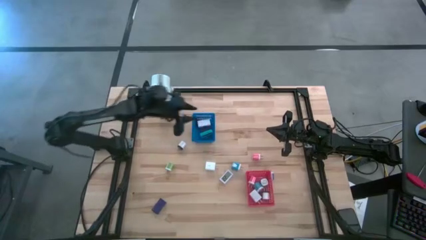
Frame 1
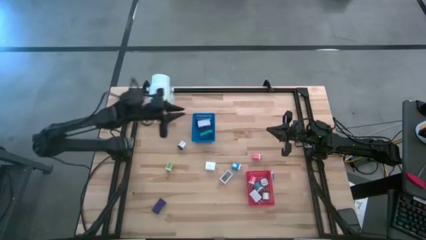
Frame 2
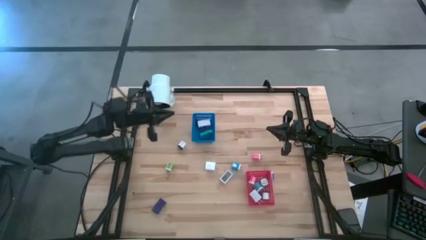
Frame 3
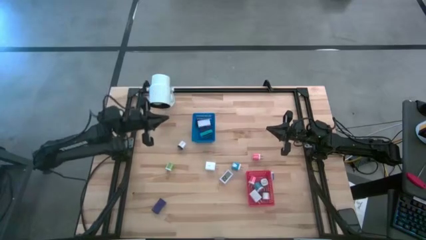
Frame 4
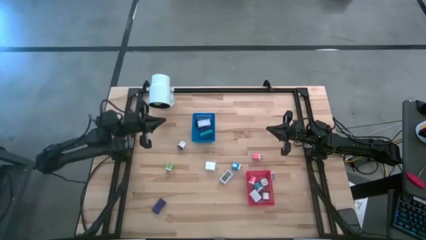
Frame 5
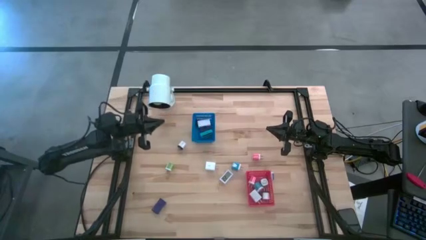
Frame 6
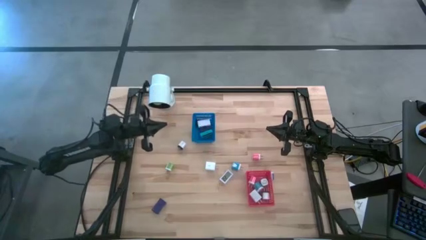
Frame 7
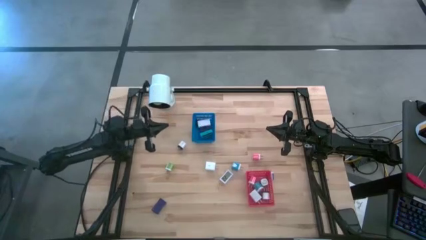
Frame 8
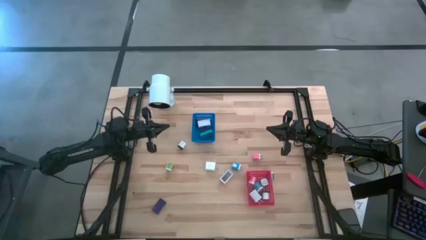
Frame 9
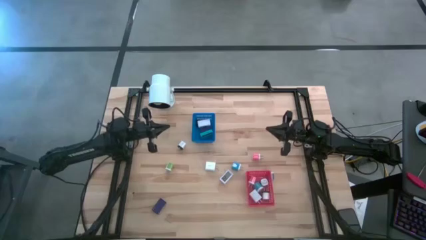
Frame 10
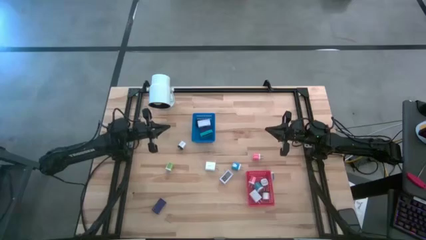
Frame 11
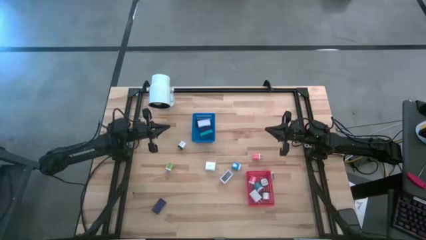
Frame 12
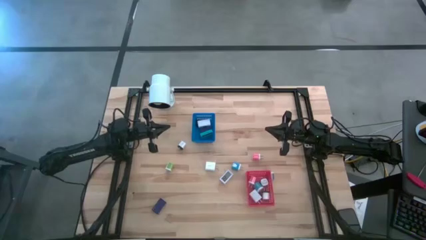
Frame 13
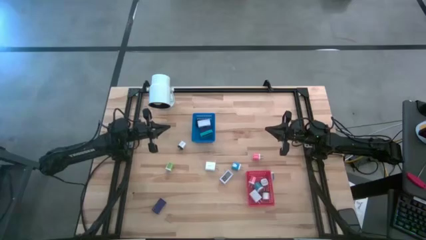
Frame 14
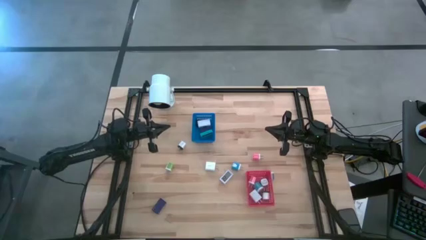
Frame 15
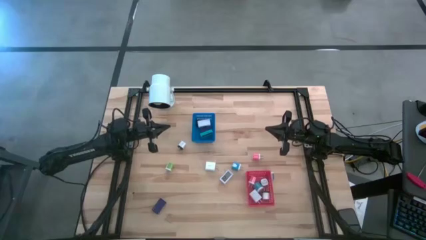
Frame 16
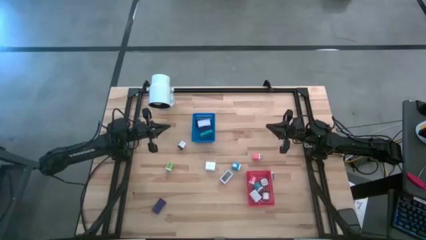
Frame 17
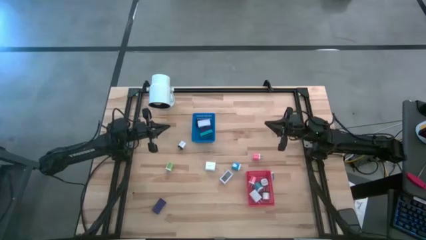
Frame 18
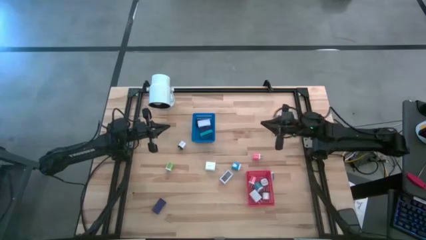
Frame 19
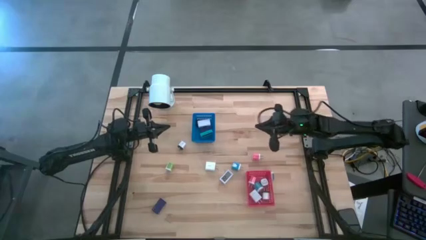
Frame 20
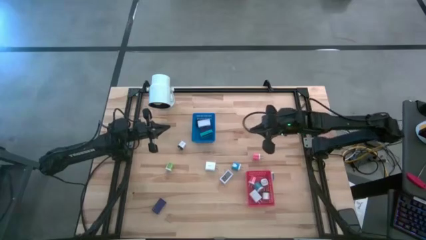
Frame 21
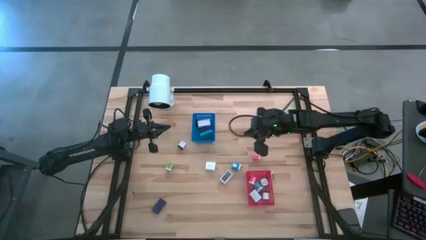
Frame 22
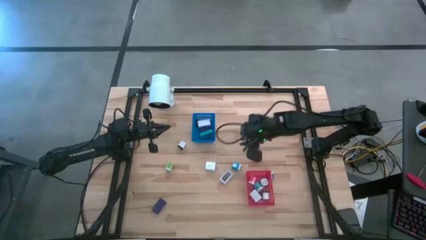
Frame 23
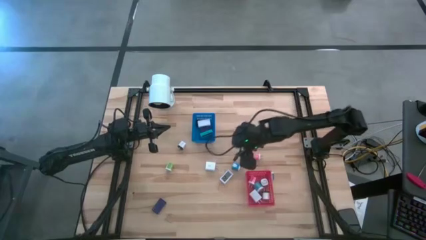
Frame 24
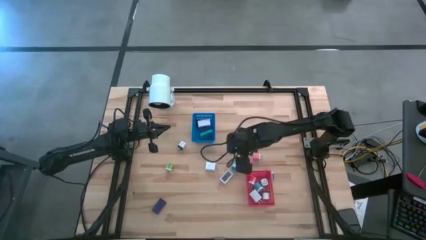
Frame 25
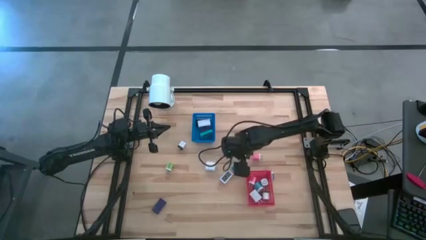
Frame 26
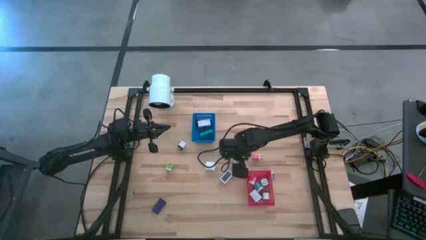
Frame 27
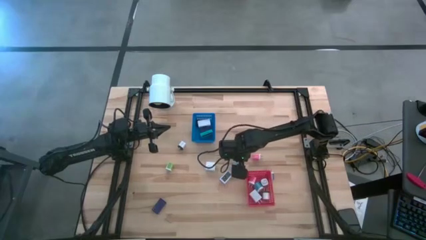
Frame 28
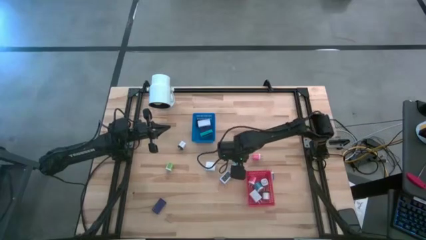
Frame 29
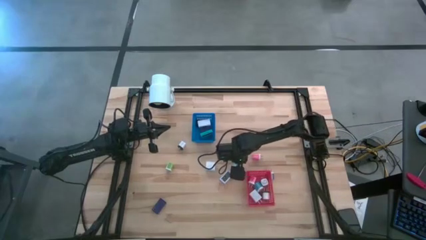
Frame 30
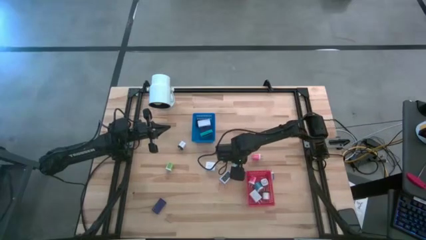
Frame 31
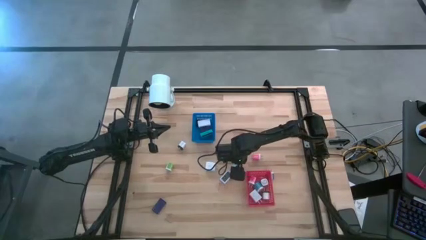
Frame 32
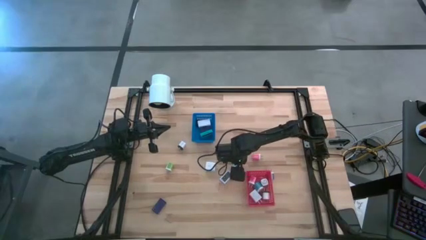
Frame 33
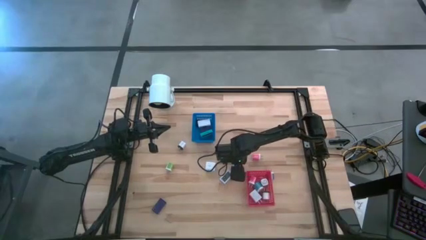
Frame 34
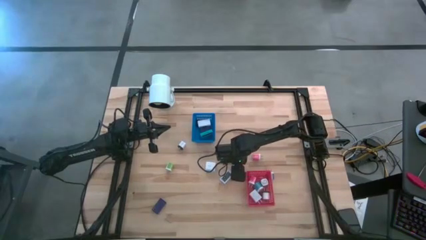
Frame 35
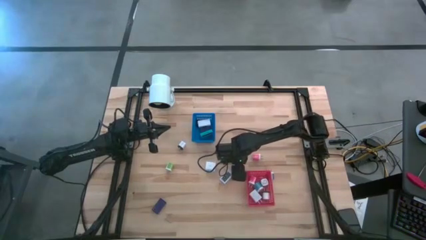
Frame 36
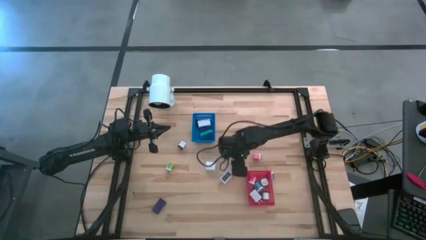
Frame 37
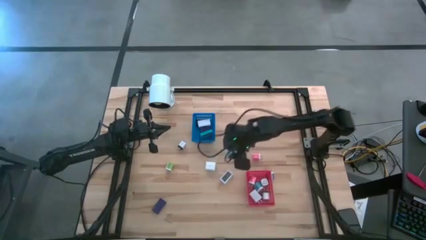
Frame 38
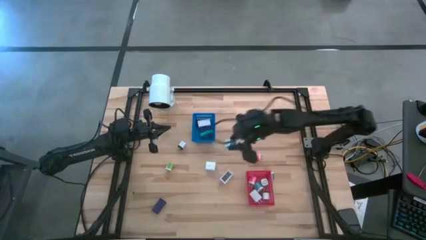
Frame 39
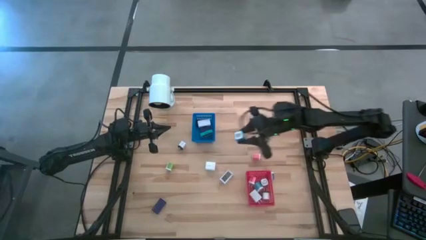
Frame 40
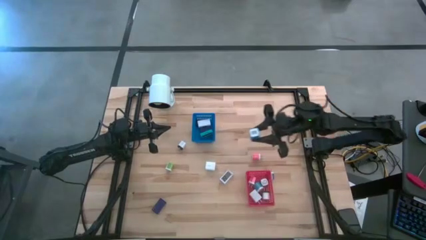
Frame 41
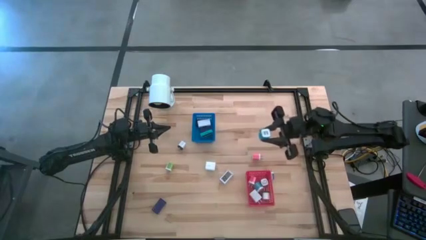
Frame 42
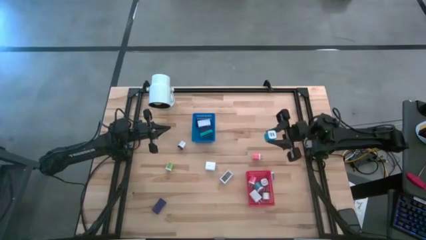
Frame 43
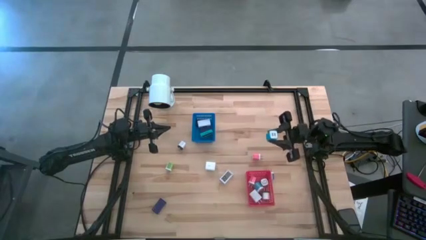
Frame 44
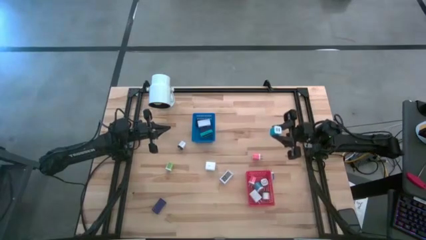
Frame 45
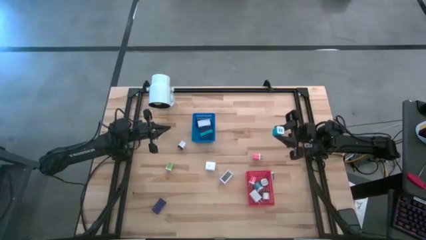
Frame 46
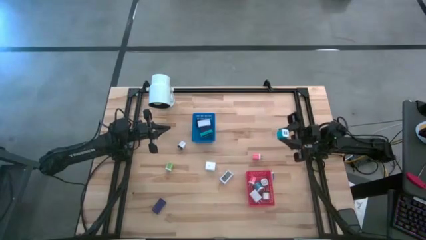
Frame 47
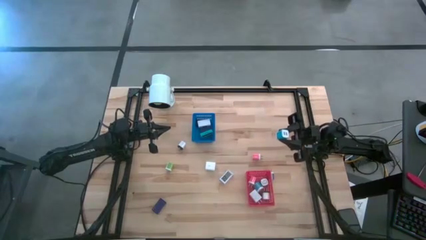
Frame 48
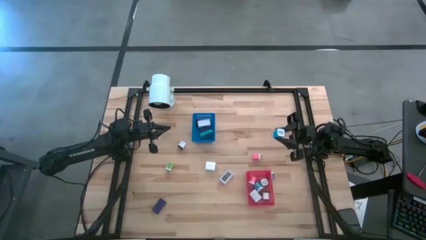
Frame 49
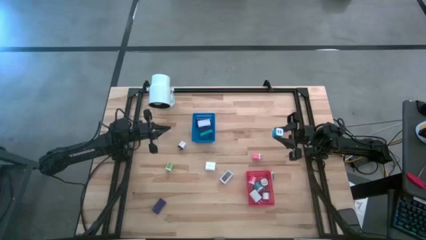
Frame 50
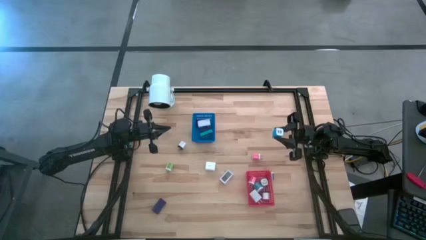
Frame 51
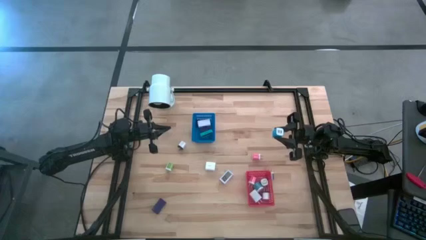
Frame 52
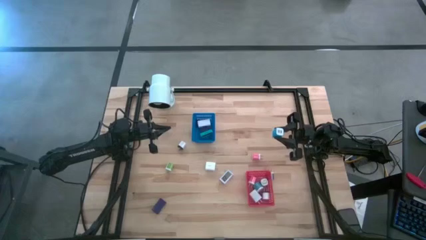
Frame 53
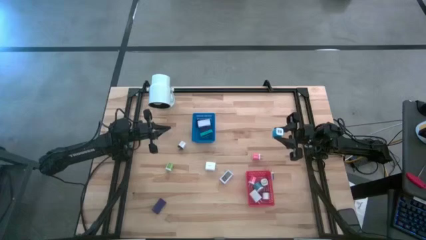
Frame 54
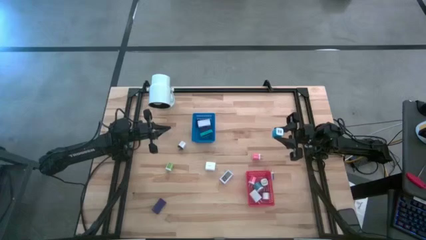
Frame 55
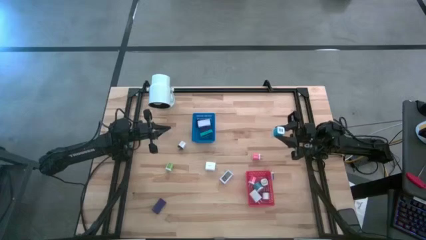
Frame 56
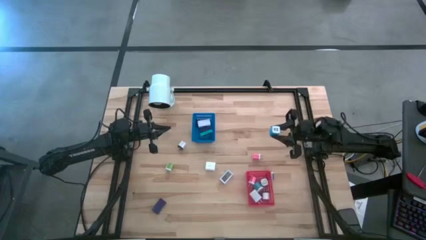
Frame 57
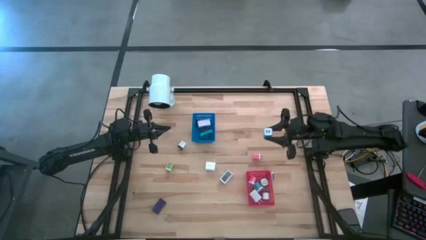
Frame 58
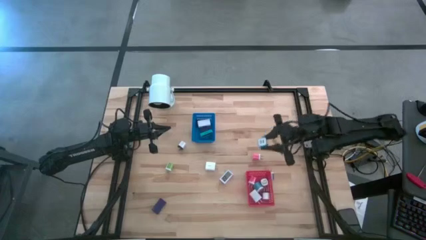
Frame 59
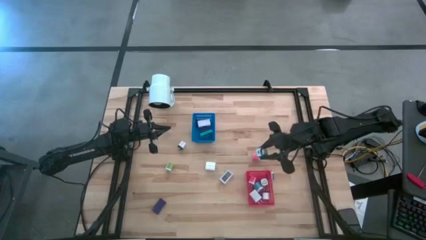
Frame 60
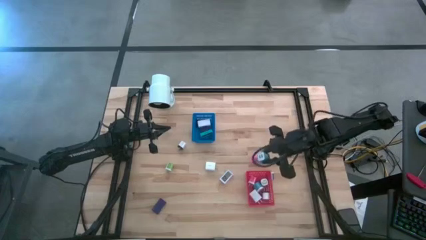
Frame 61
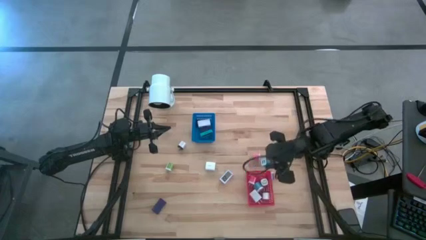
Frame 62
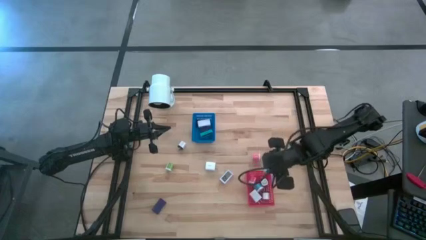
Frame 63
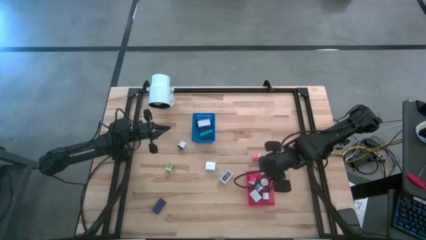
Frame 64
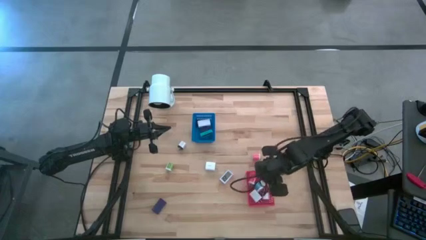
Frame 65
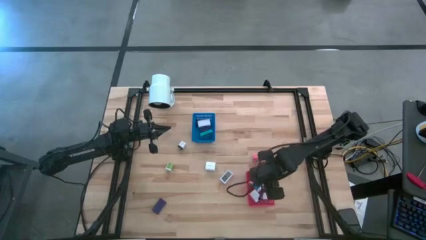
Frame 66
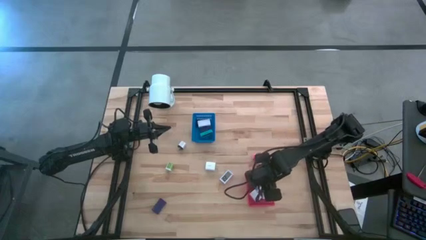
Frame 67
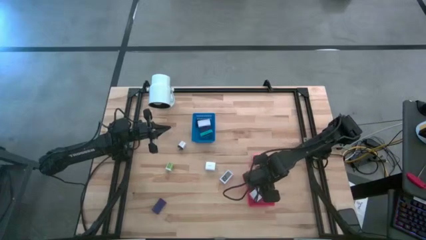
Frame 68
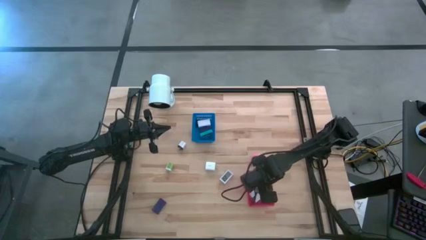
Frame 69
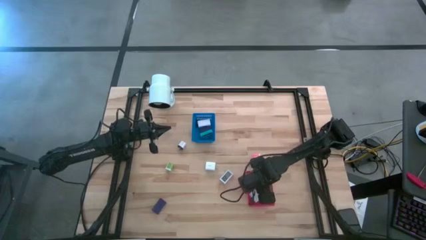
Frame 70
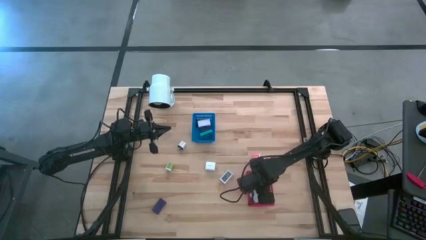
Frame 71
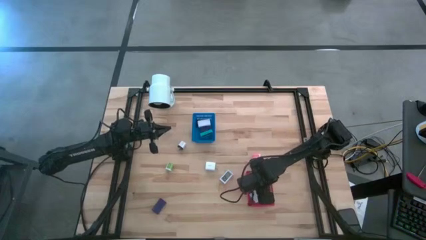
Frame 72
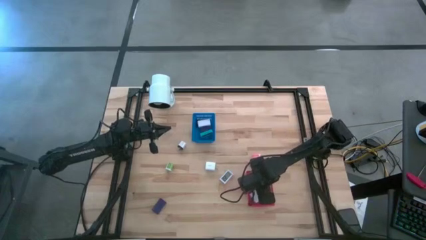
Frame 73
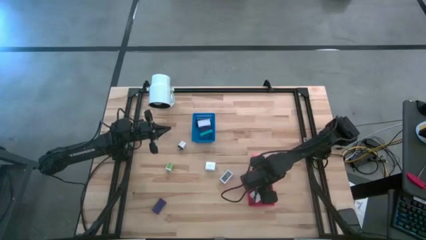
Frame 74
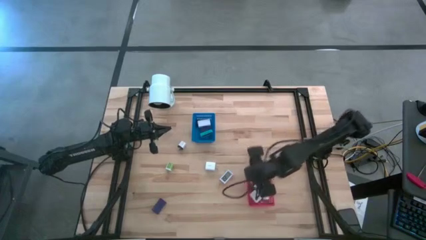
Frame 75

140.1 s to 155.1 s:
Task: Pick & Place Office items
Put the blue charger adapter into the red bin
